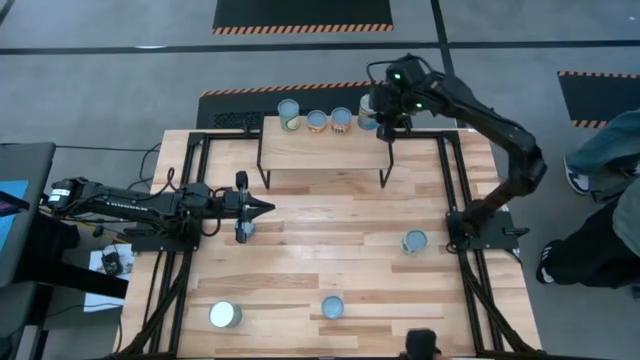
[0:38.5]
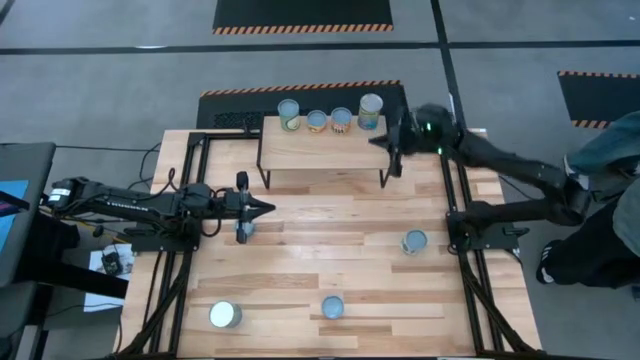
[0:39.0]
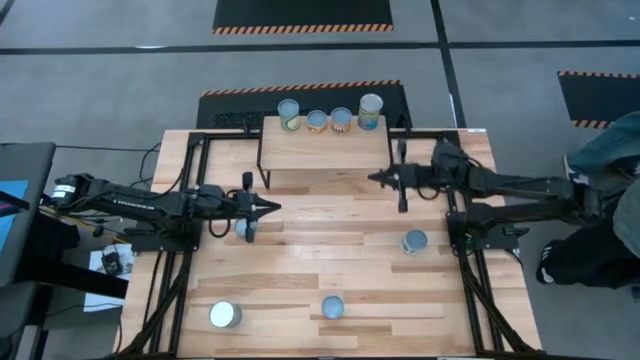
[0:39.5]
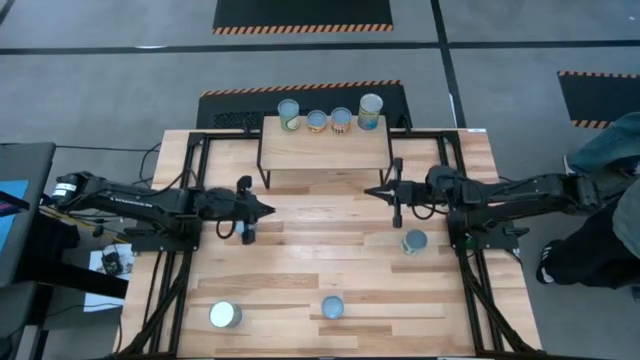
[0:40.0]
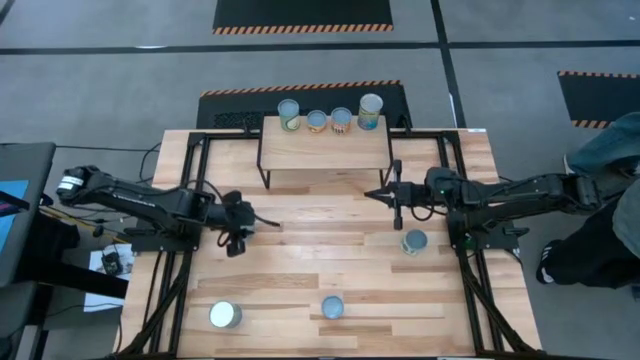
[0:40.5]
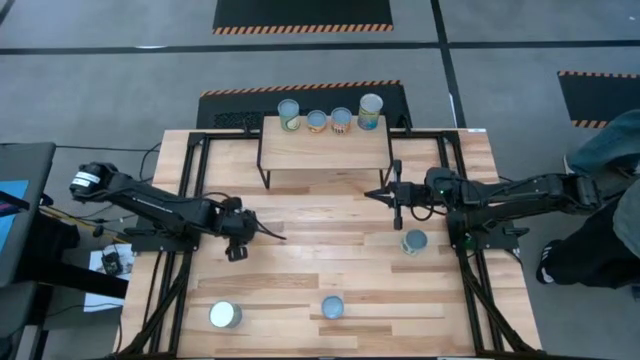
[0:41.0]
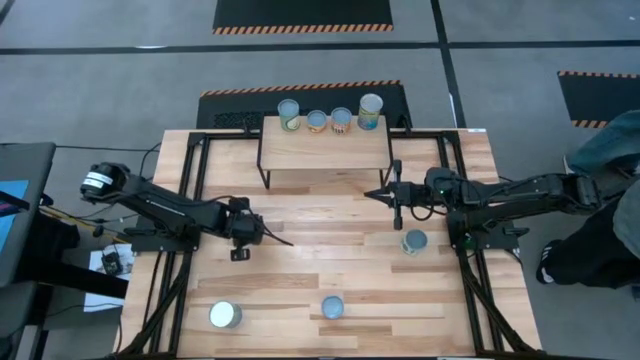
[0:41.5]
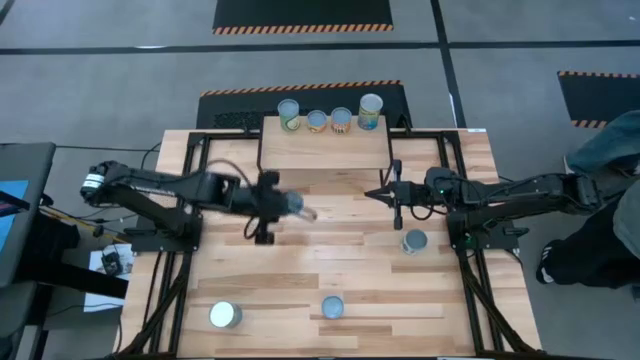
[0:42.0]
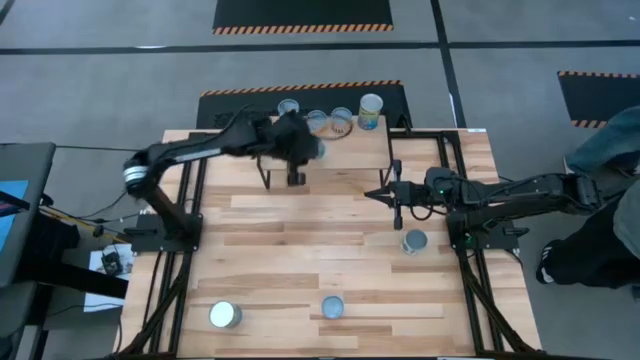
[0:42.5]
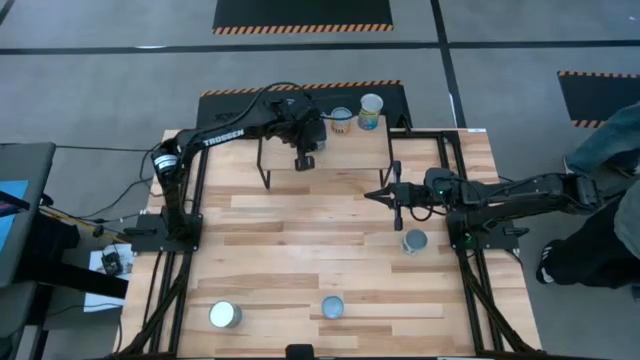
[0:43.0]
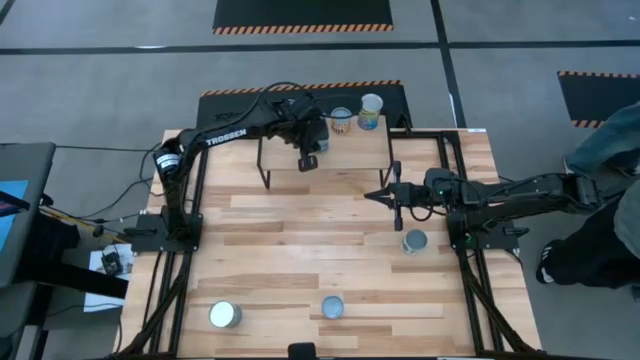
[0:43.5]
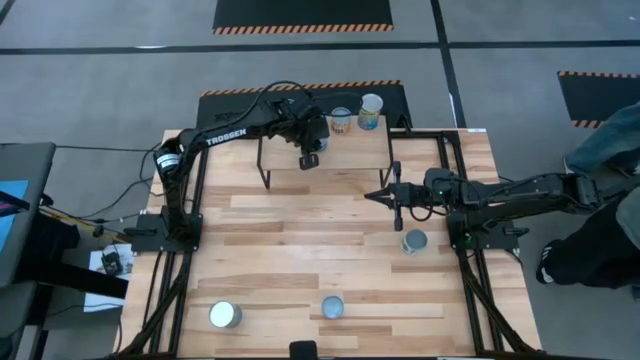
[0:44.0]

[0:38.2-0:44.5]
Task: Pick and place cans onto a shelf
Put the blue tuna can on the shelf

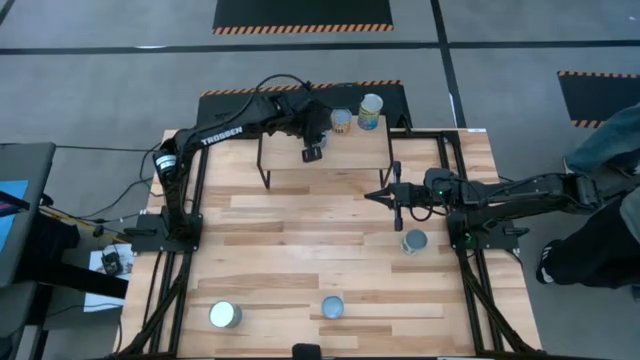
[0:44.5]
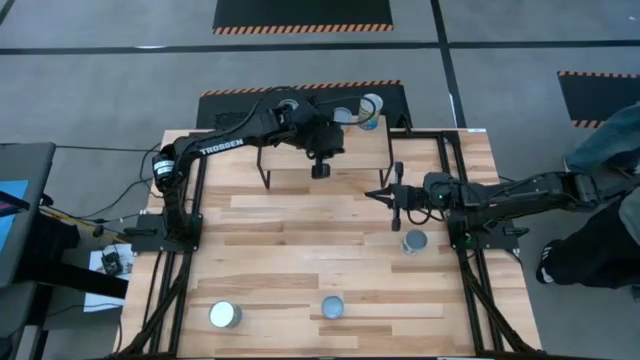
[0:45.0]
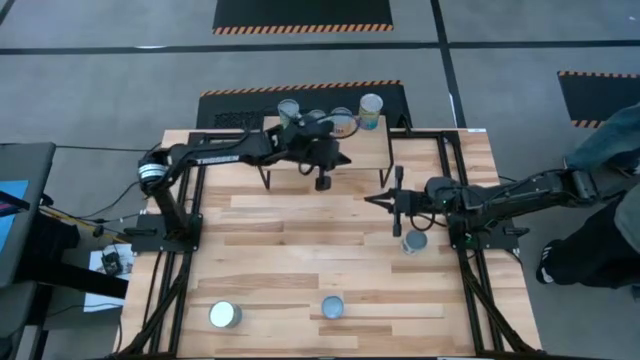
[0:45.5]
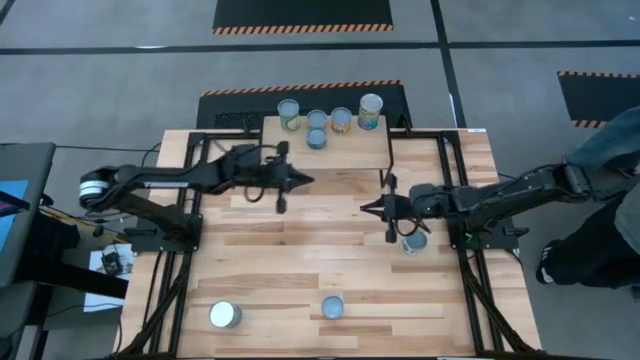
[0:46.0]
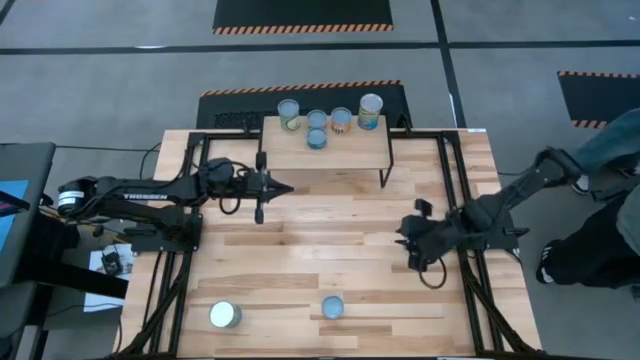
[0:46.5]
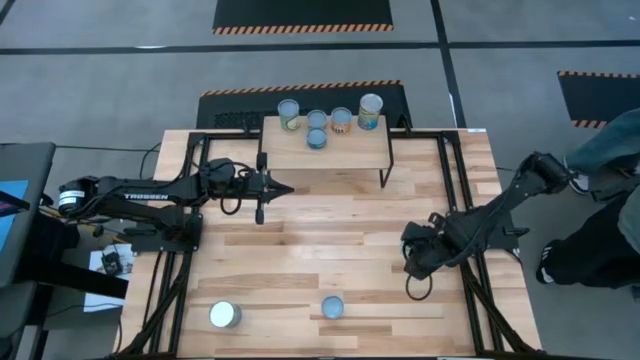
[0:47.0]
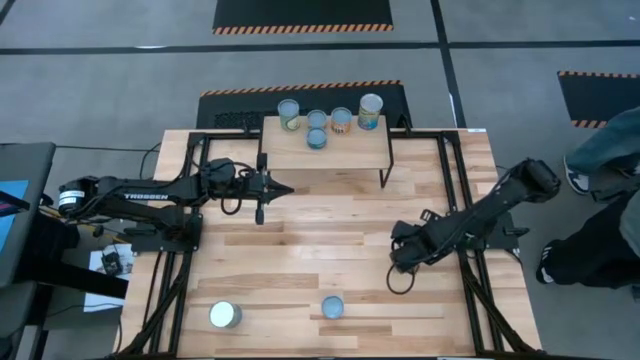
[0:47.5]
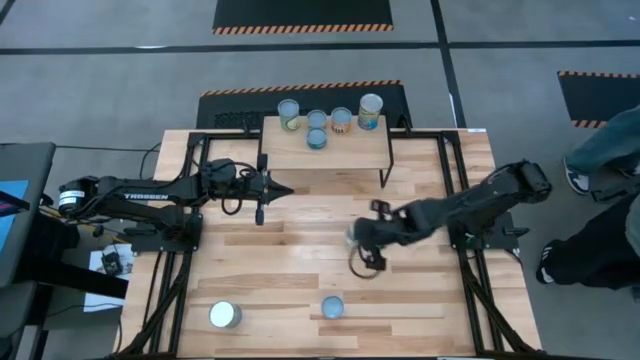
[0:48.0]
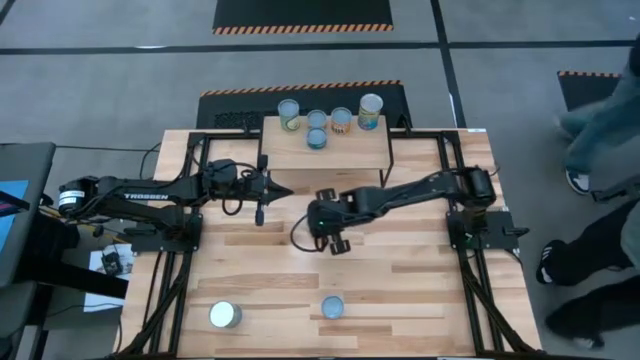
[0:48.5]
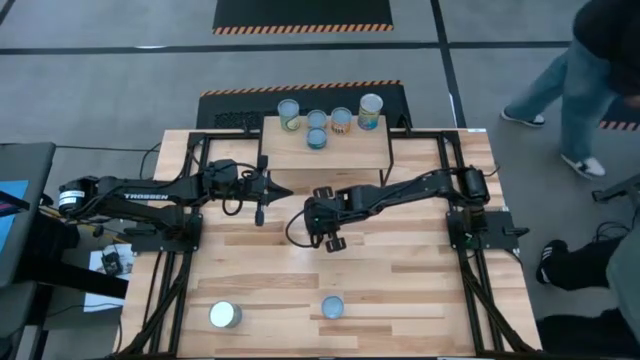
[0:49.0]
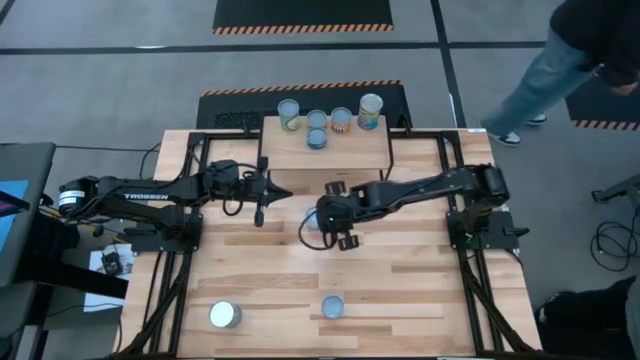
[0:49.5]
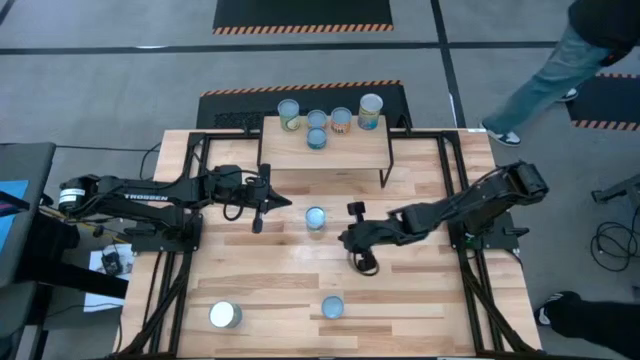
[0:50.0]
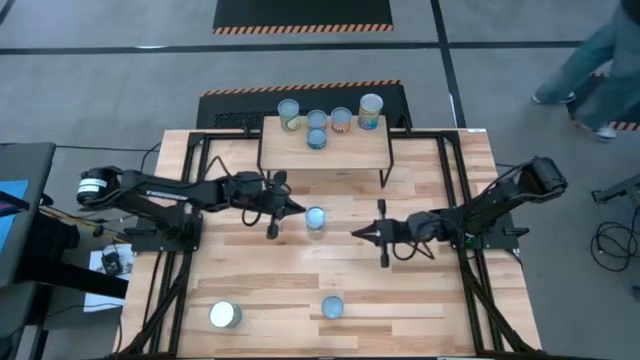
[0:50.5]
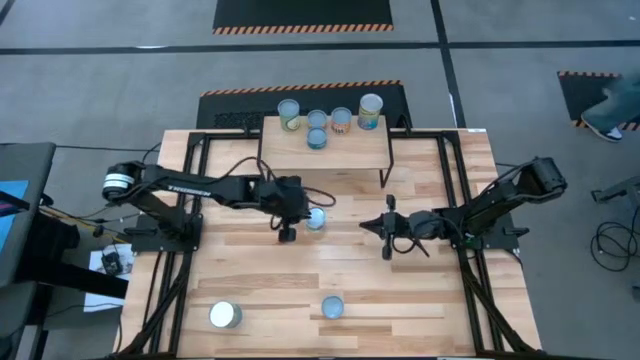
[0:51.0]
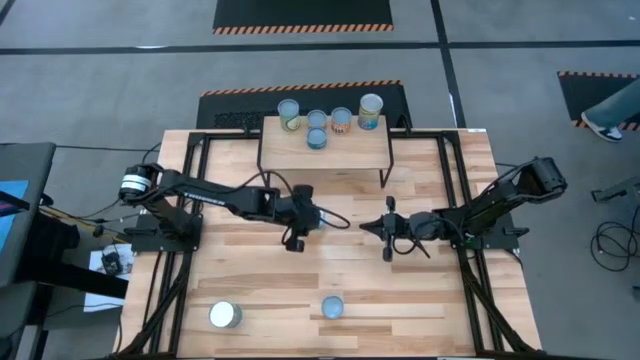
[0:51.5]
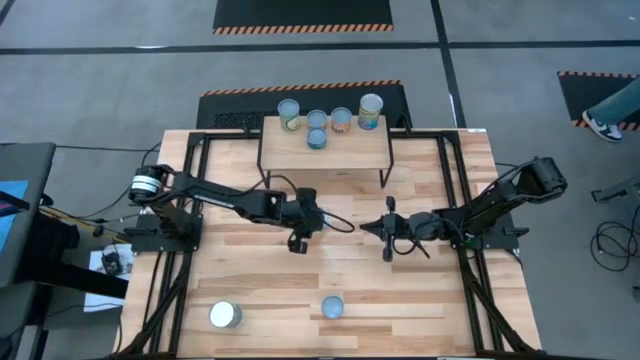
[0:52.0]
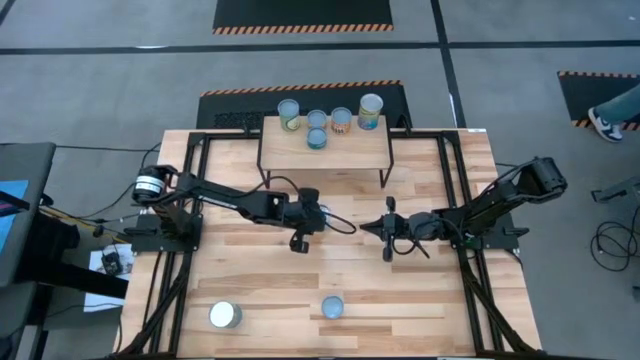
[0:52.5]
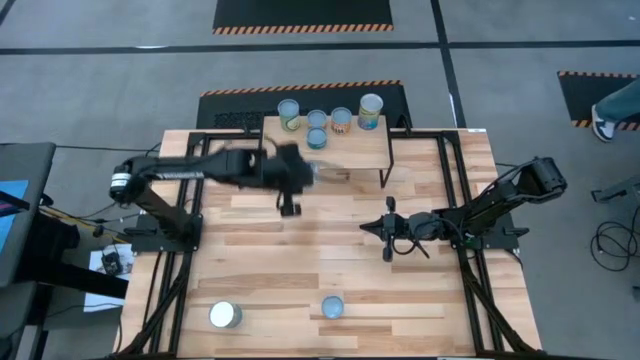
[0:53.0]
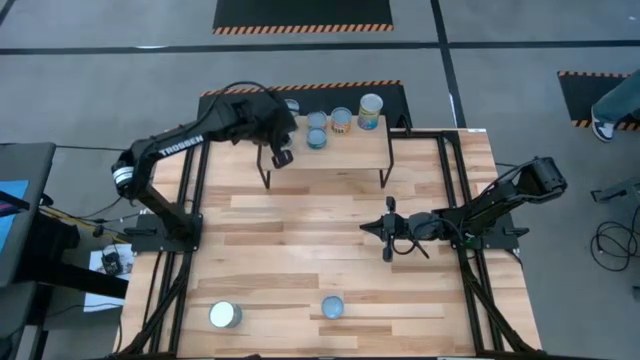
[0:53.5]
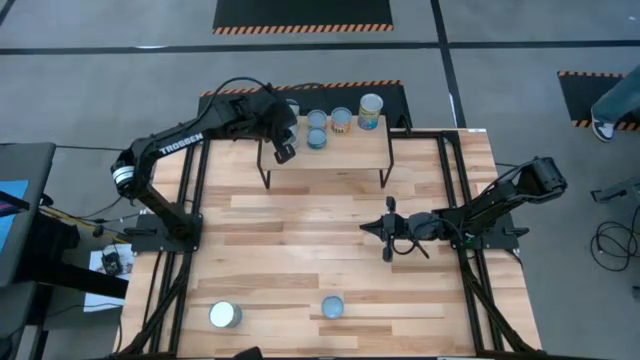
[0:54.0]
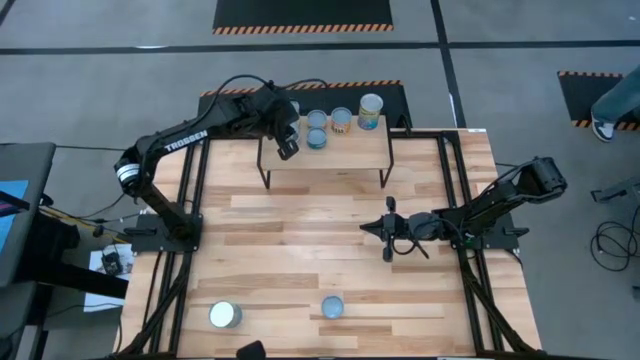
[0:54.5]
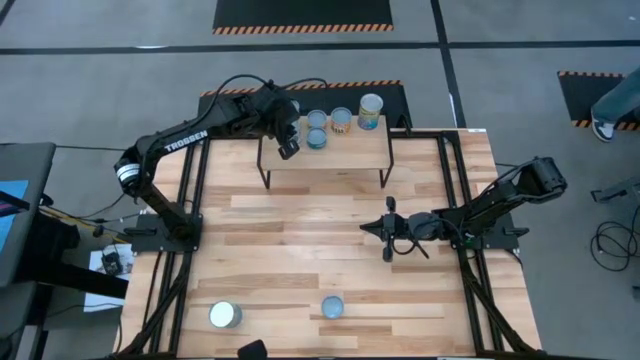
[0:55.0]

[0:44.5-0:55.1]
Put the white mixed vegetables can on the shelf

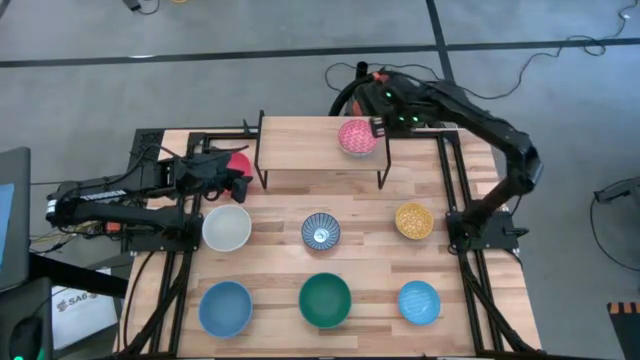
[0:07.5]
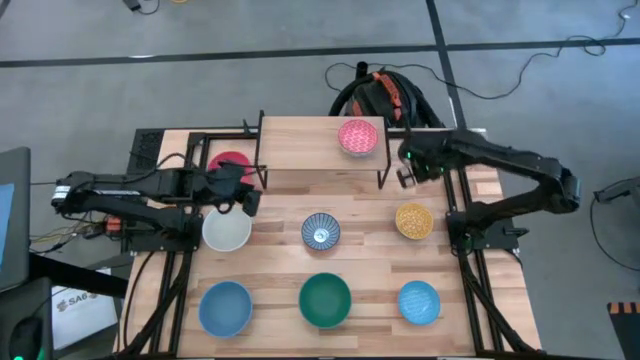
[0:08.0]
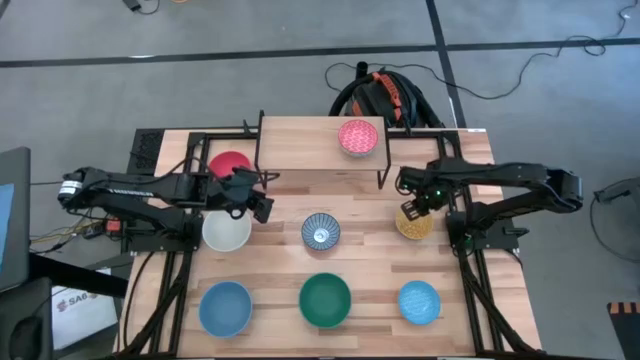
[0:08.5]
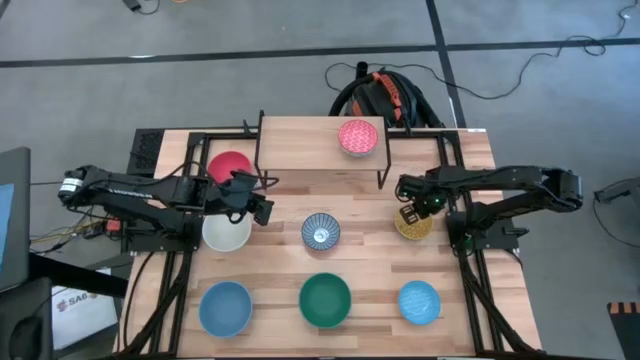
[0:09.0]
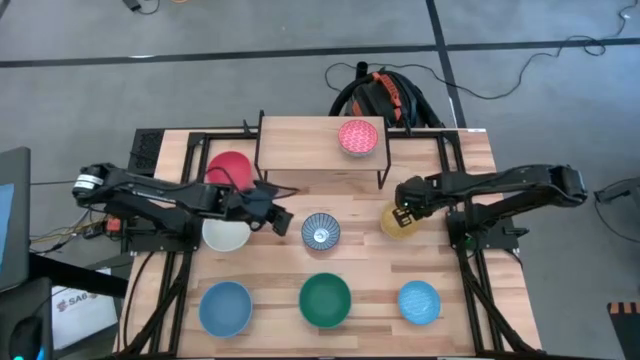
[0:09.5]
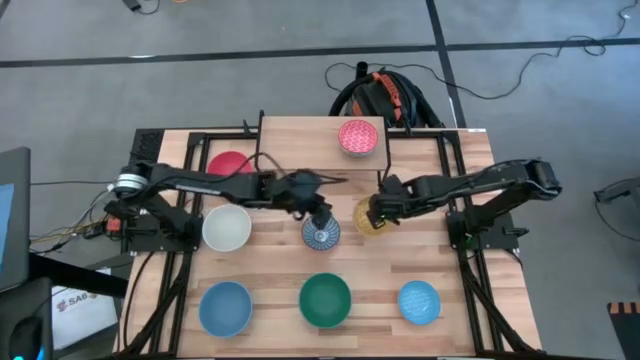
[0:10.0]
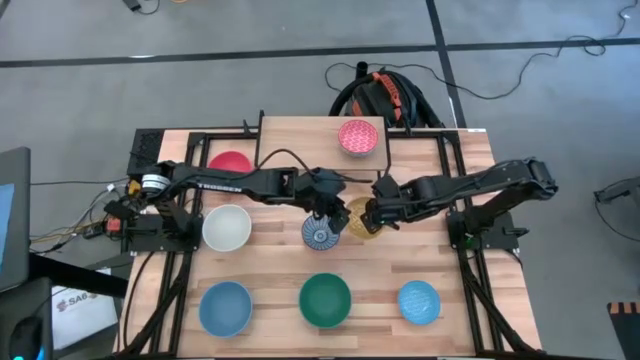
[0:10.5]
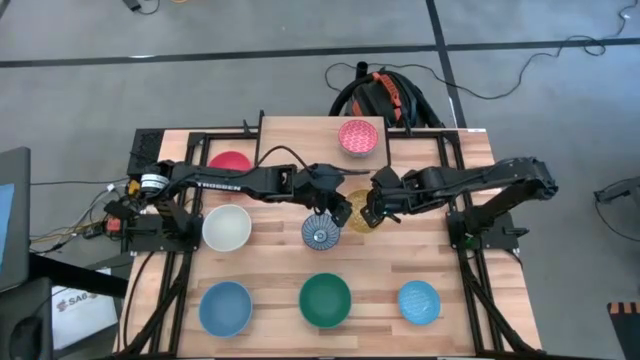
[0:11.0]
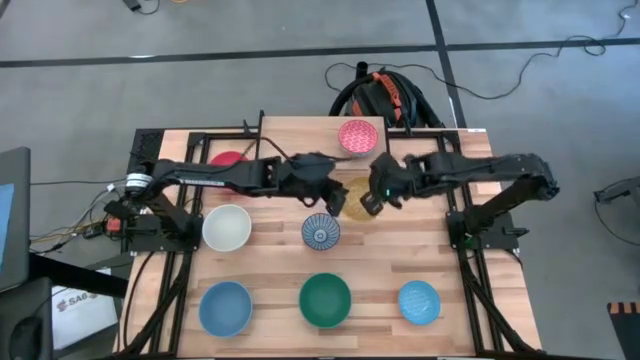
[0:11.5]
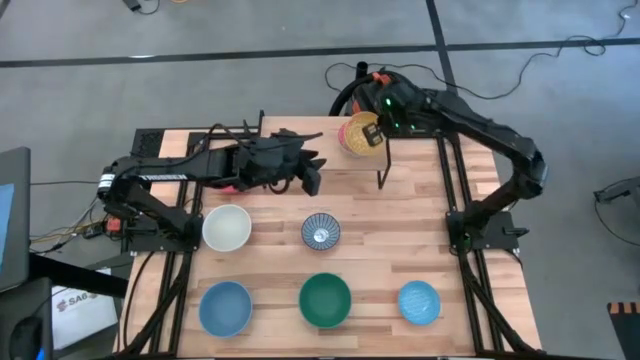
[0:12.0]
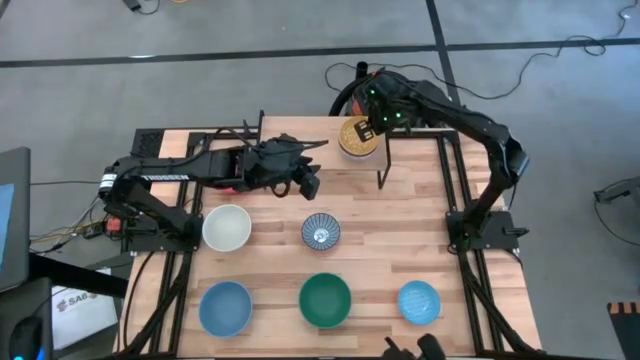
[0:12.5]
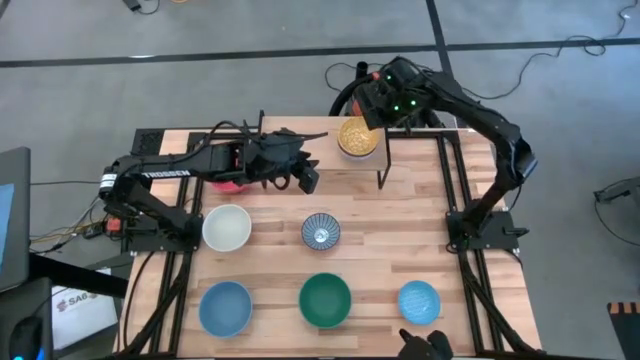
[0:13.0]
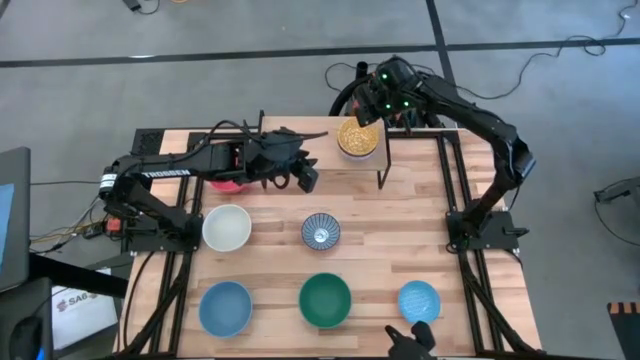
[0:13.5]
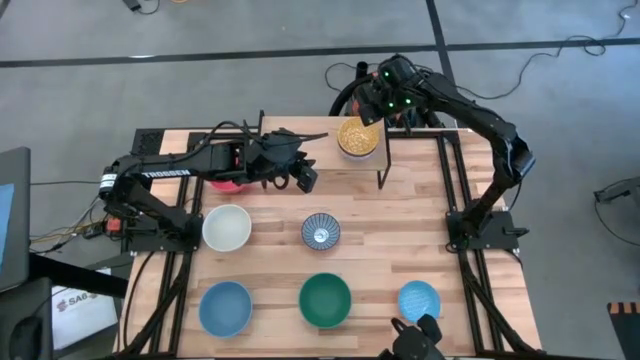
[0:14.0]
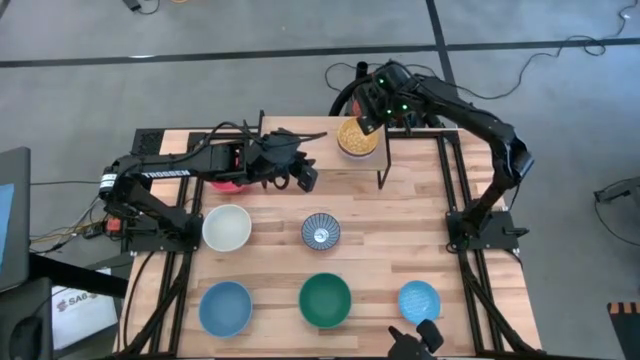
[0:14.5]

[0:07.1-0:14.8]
Task: Place and stack bowls onto a shelf
Stack the yellow patterned bowl on top of the red patterned bowl
